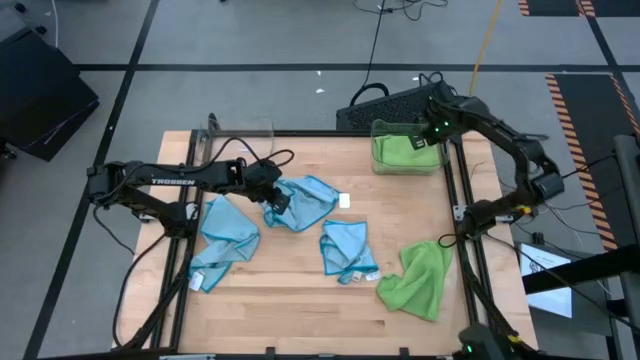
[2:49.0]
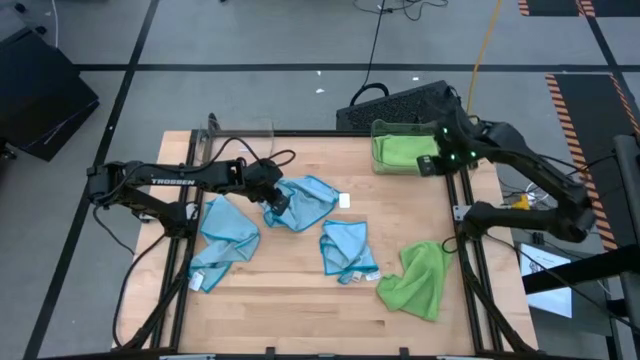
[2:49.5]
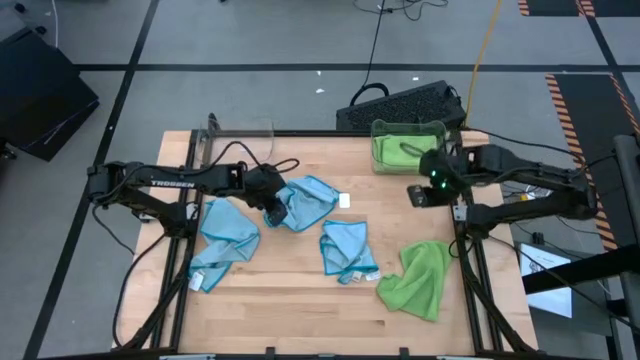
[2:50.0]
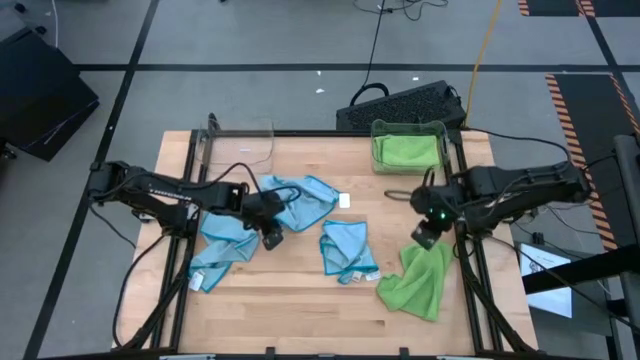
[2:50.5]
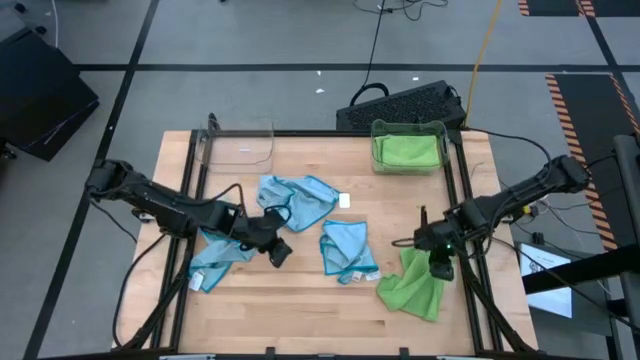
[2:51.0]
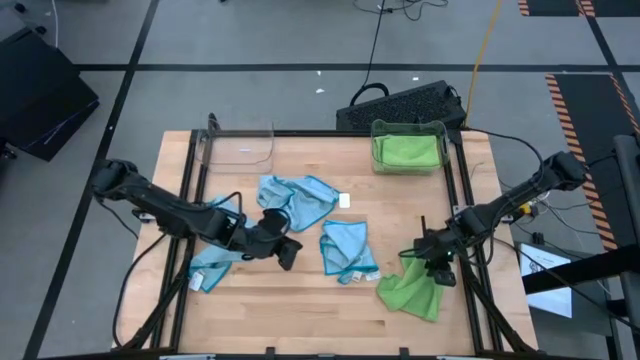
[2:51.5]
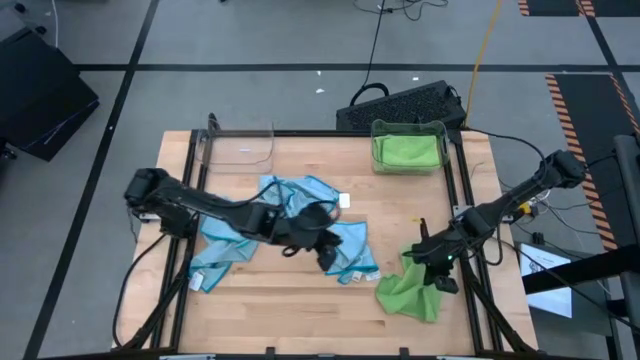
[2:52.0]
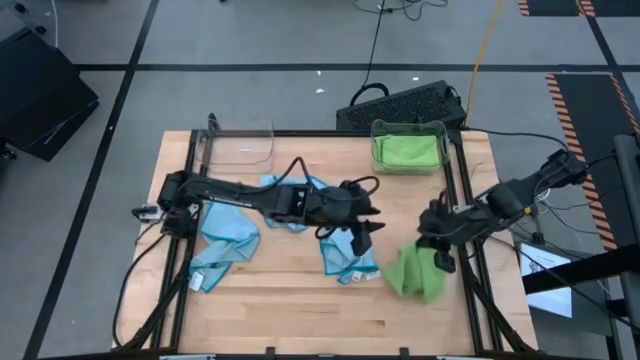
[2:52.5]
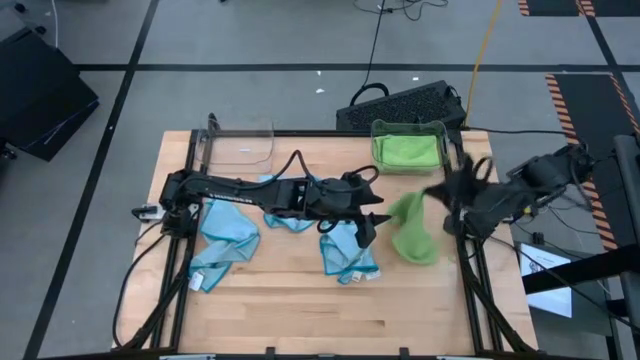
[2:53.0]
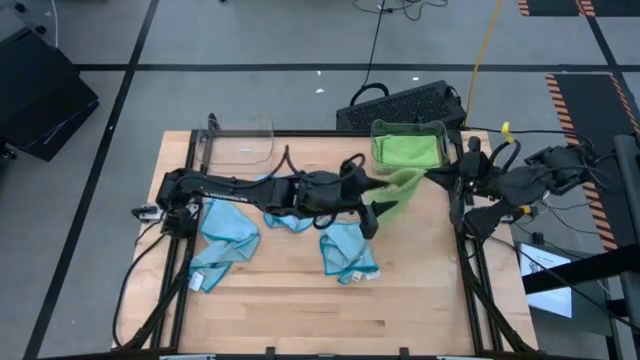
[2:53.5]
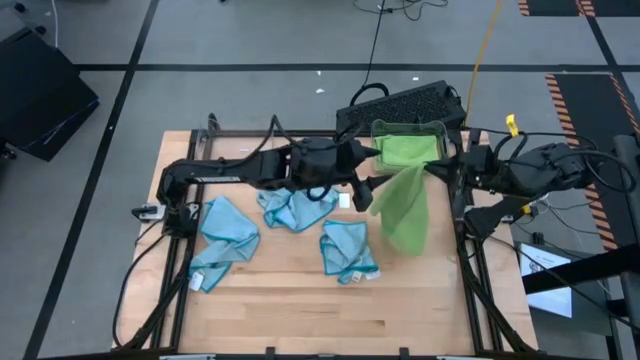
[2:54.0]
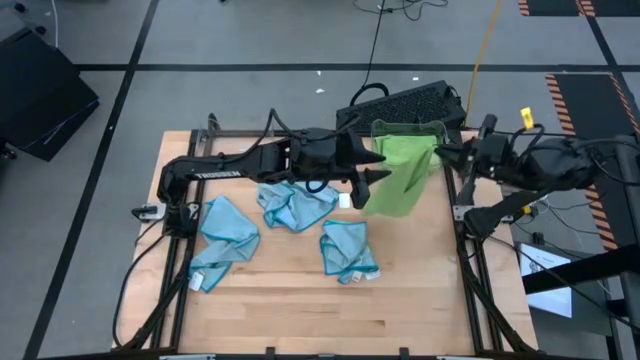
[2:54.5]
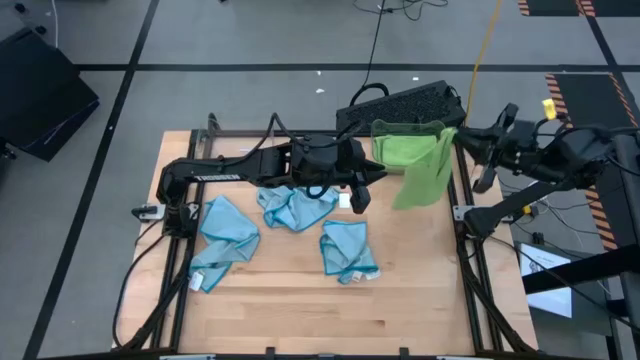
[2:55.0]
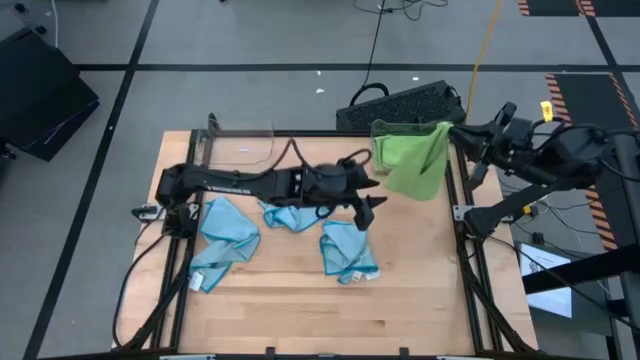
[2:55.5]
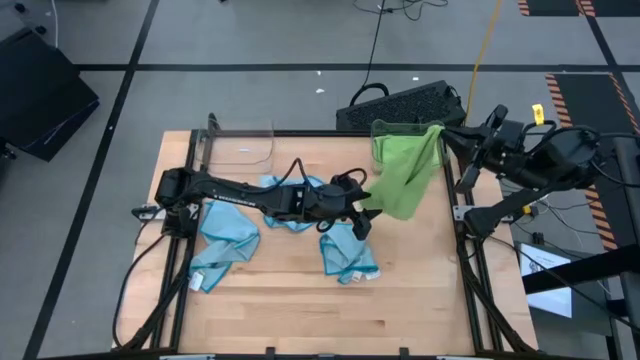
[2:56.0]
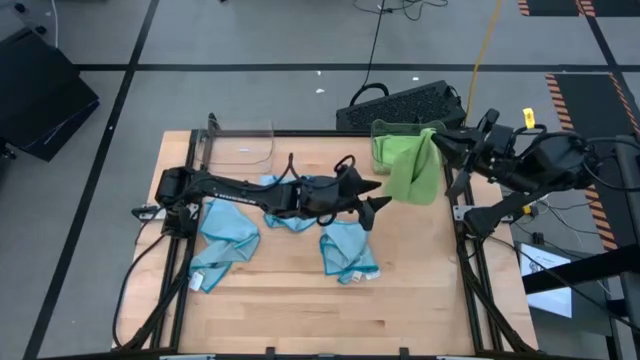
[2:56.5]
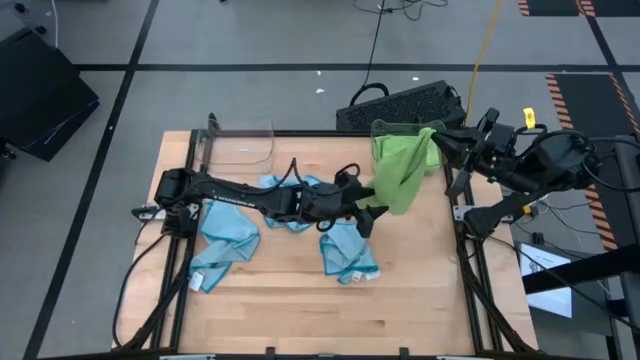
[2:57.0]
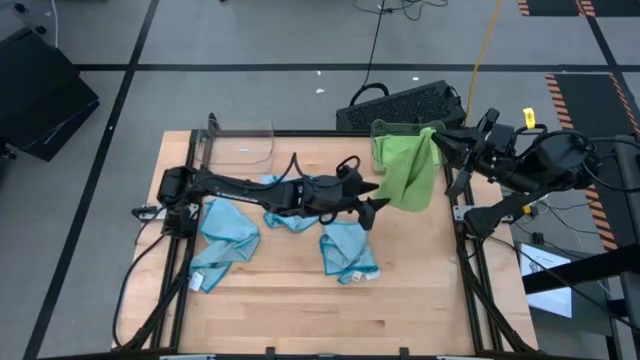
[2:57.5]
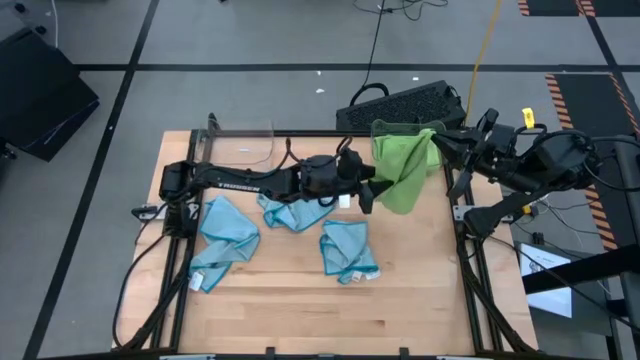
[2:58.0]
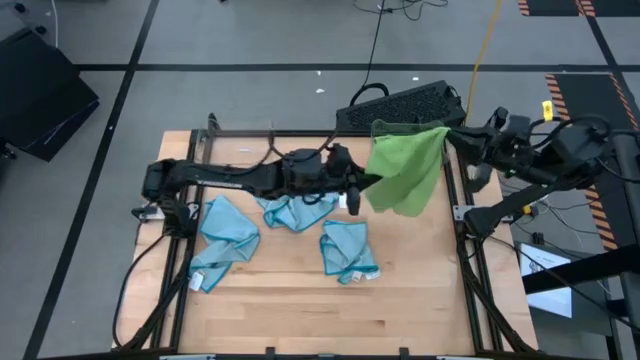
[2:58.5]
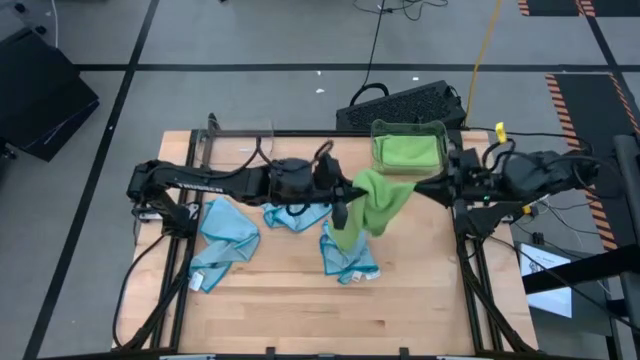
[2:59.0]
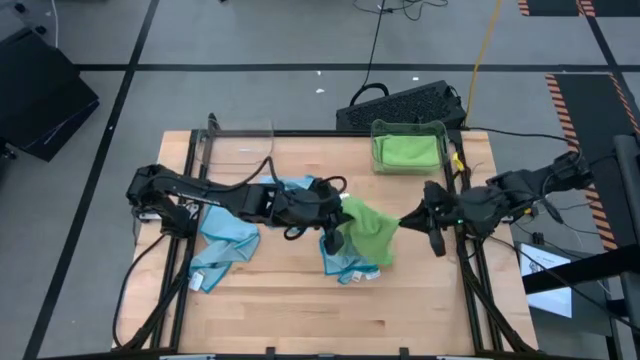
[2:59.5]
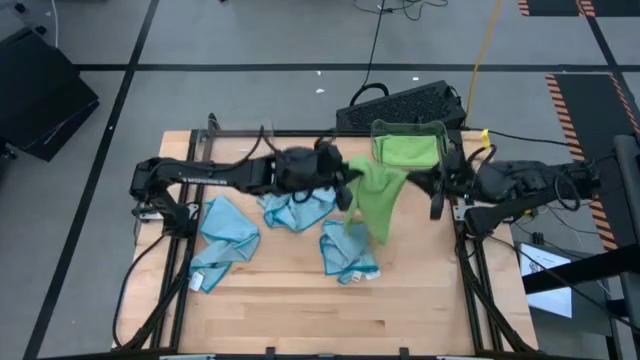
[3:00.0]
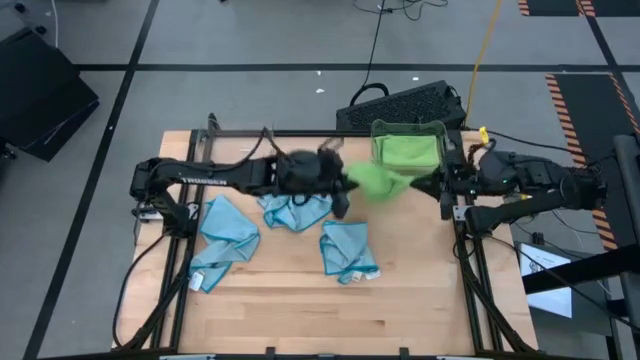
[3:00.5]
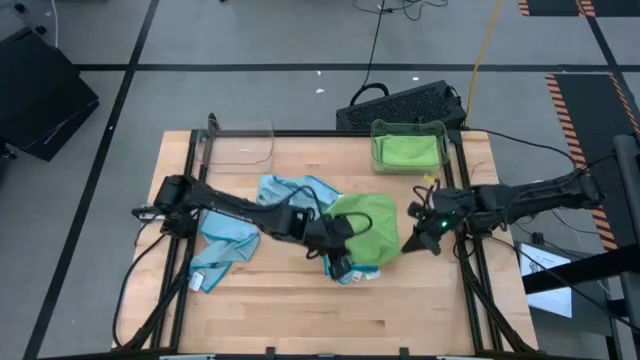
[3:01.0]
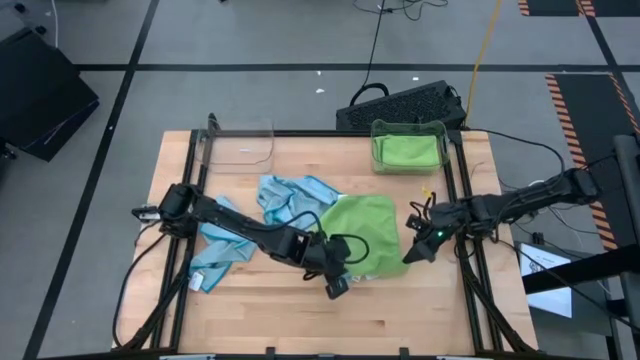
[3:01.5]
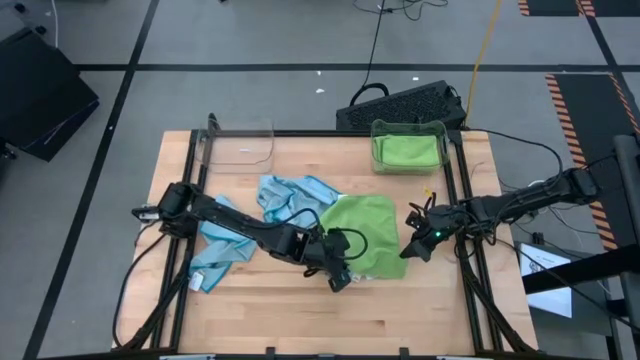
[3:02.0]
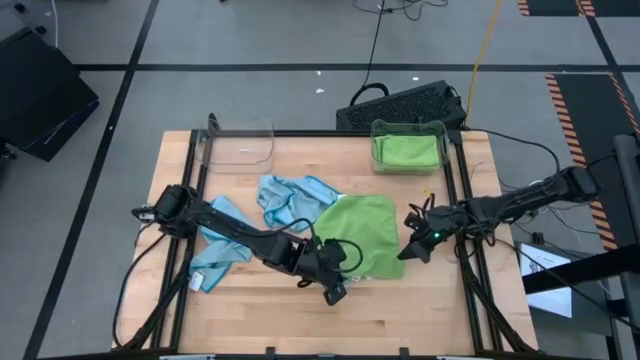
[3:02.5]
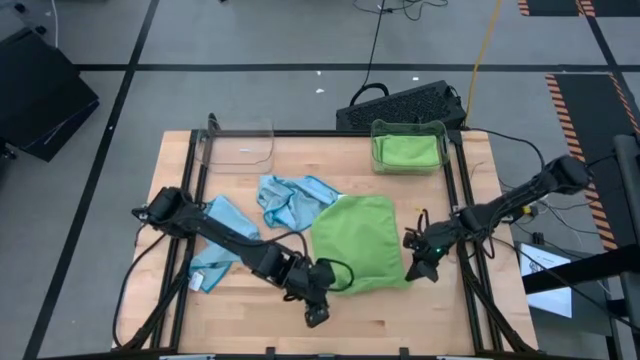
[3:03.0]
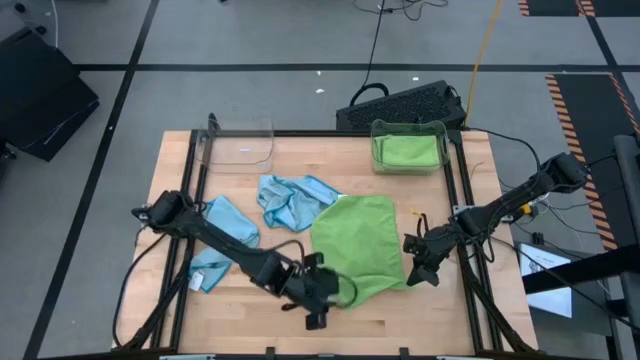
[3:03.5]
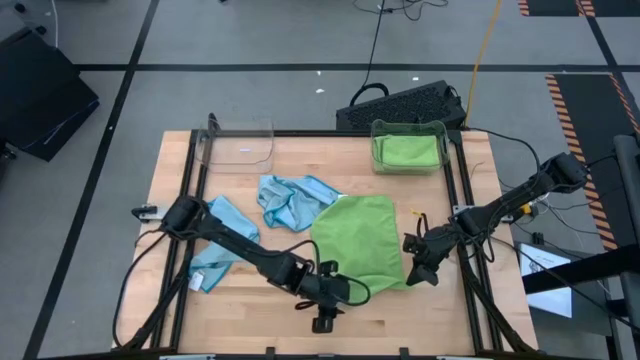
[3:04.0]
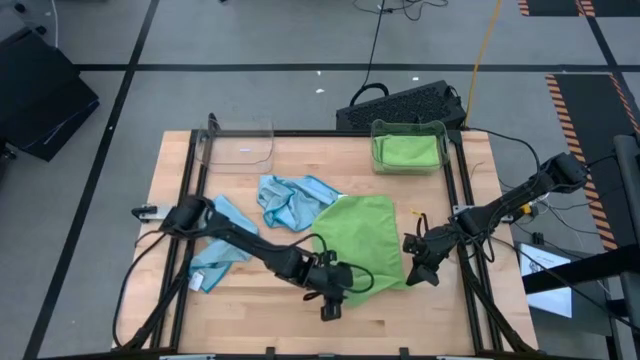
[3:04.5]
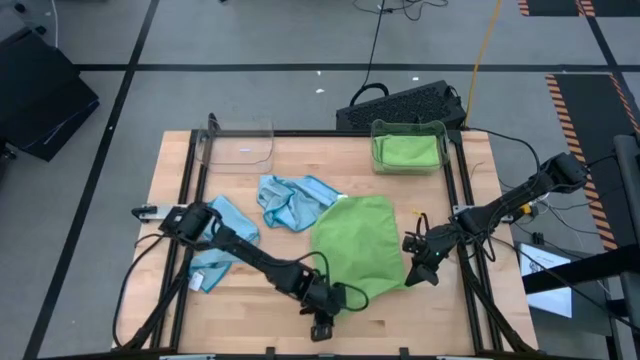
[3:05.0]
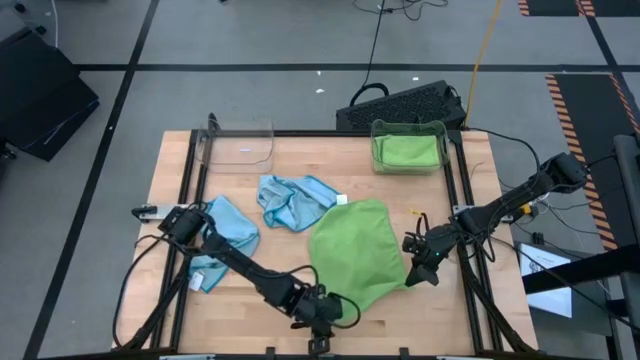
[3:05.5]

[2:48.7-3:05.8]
Task: Sort microfiber towel by color & place in baskets
Fold the green towel

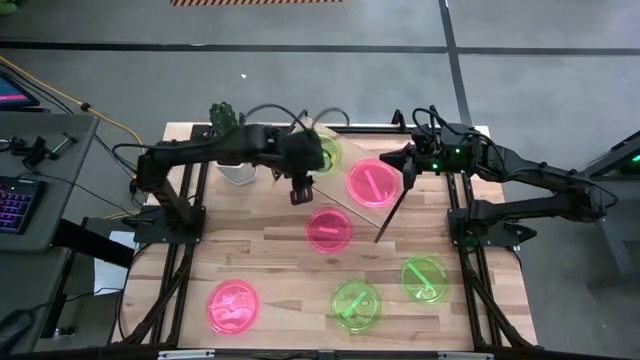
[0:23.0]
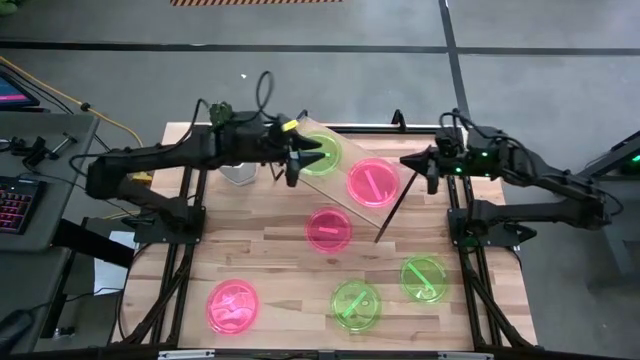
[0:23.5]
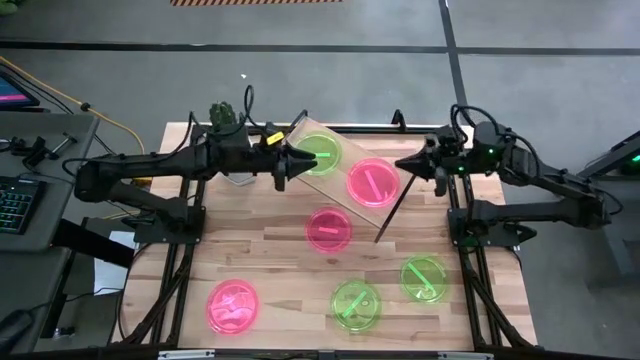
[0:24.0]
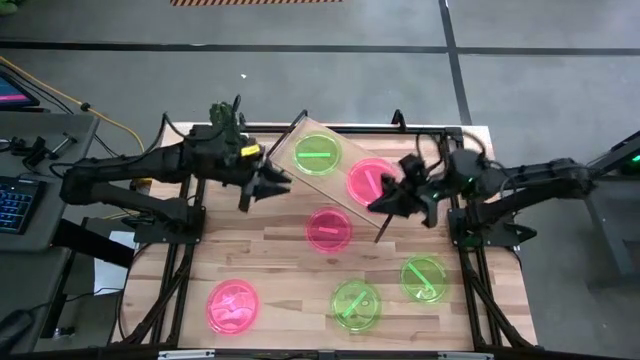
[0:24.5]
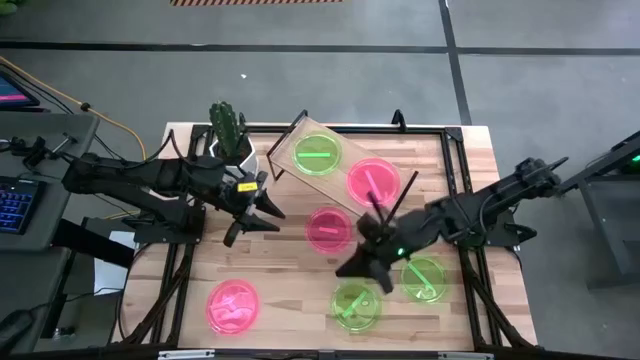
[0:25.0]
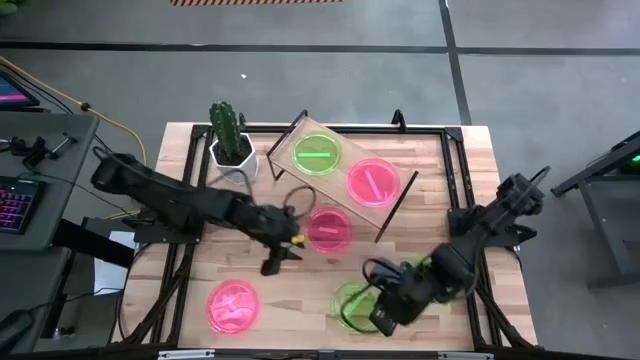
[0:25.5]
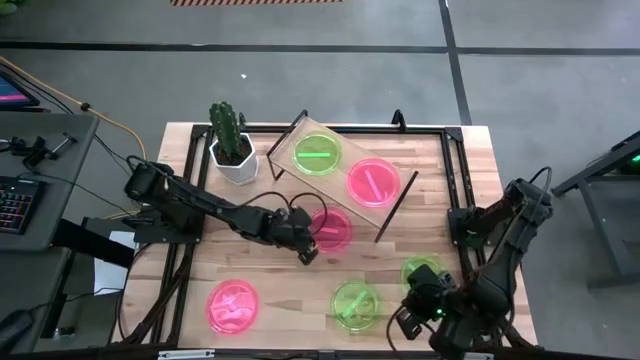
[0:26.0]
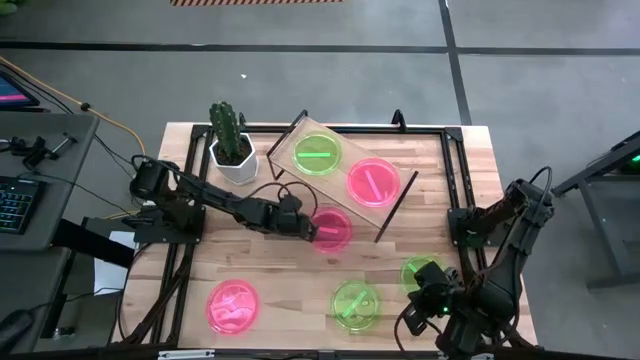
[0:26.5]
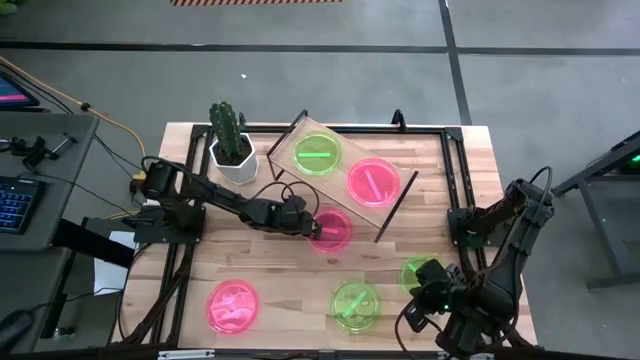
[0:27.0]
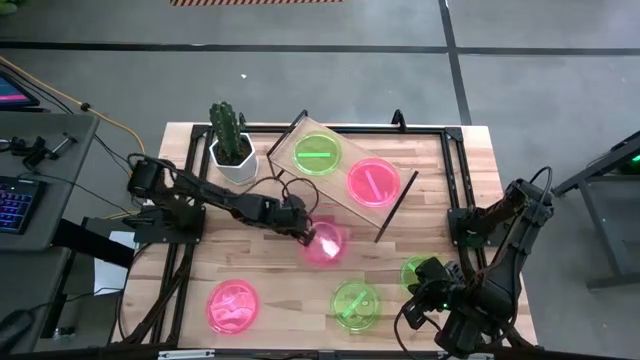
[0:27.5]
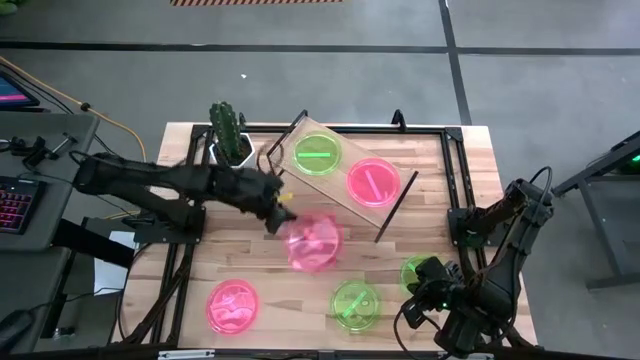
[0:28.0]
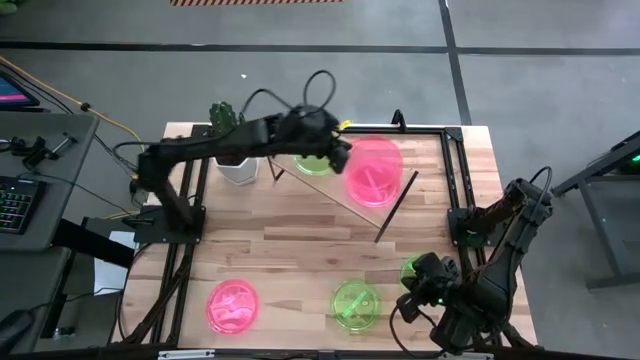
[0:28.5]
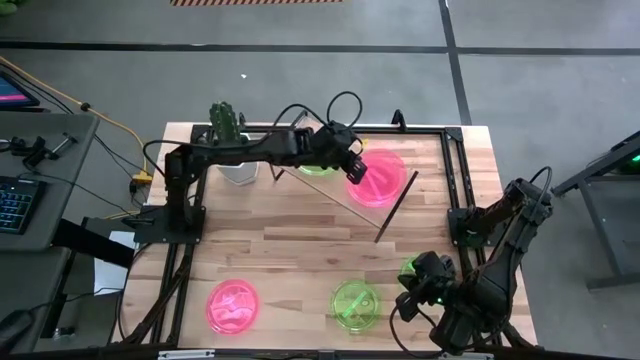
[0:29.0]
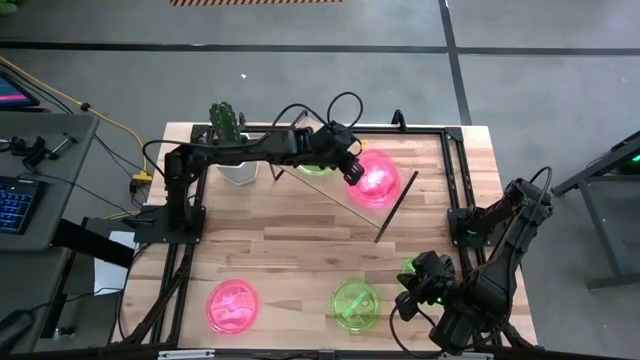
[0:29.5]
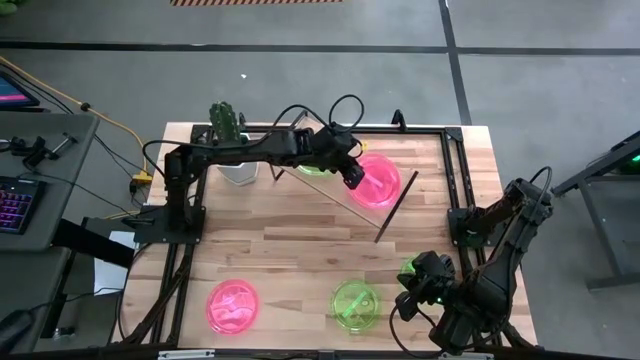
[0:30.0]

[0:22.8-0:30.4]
Task: Place and stack plates onto a shelf
Stack the top light pink plate on top of the light pink plate on the shelf
